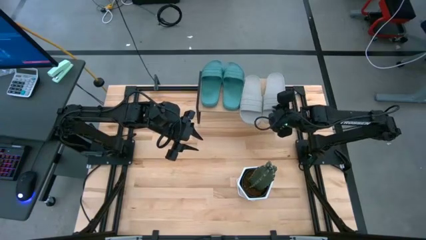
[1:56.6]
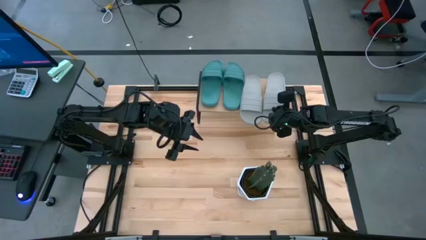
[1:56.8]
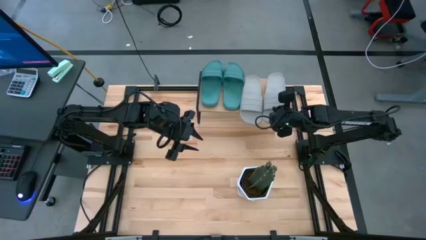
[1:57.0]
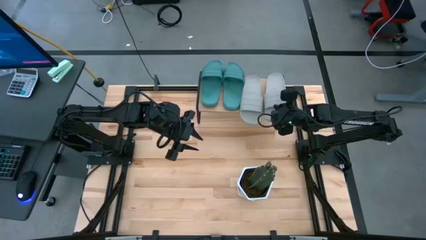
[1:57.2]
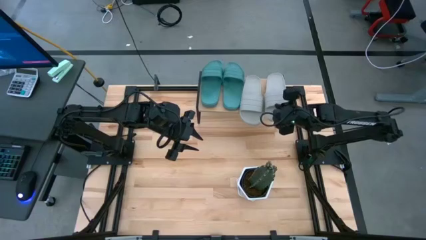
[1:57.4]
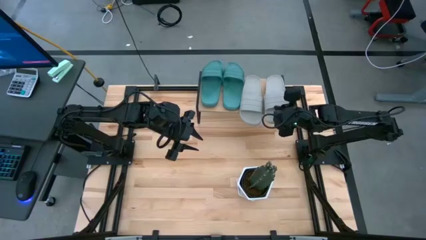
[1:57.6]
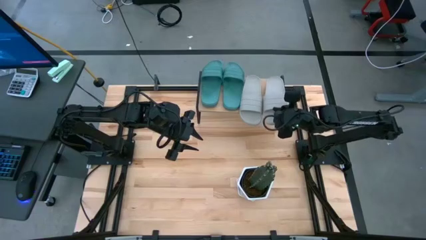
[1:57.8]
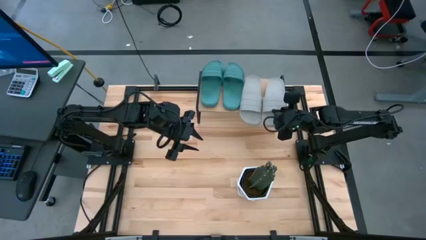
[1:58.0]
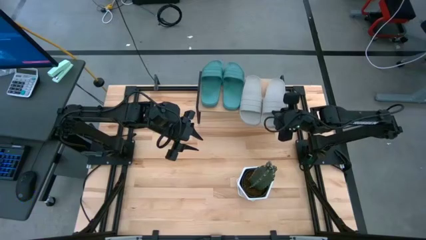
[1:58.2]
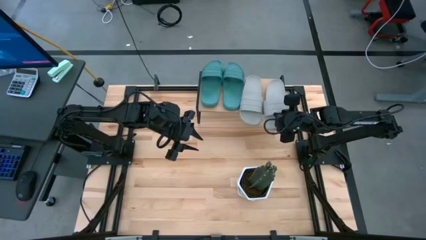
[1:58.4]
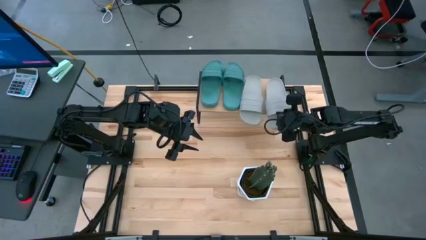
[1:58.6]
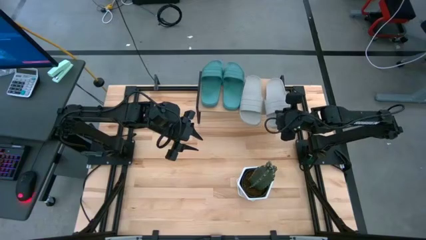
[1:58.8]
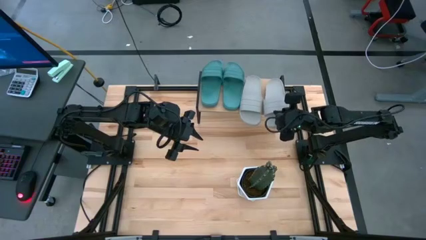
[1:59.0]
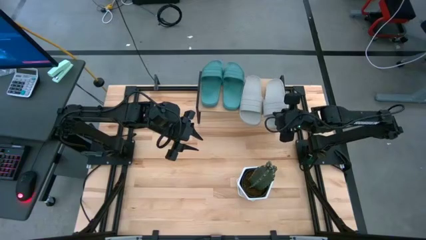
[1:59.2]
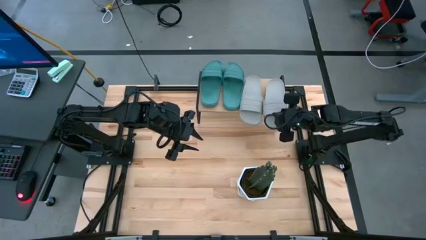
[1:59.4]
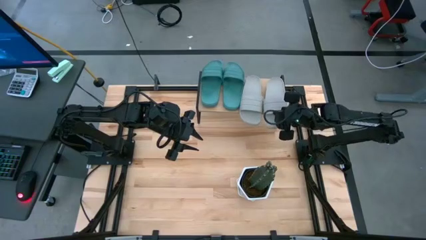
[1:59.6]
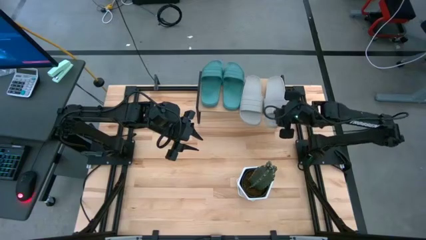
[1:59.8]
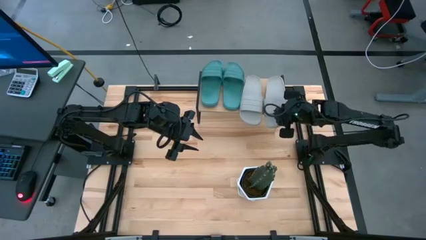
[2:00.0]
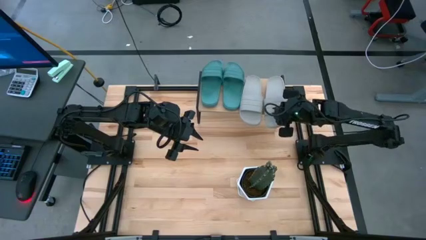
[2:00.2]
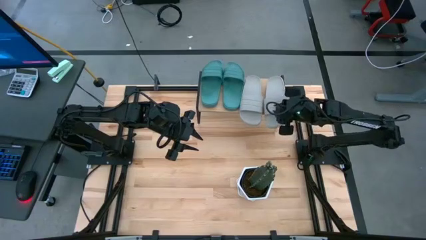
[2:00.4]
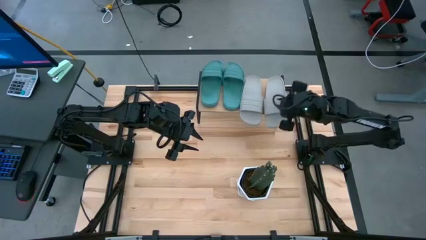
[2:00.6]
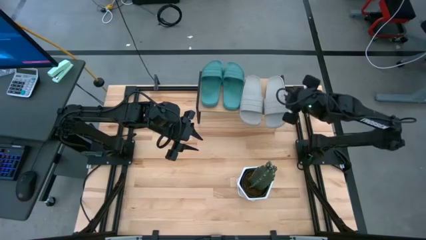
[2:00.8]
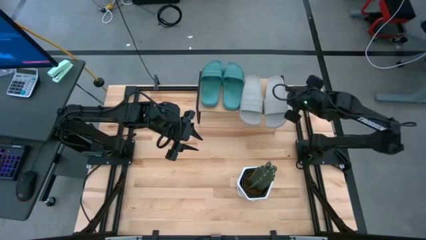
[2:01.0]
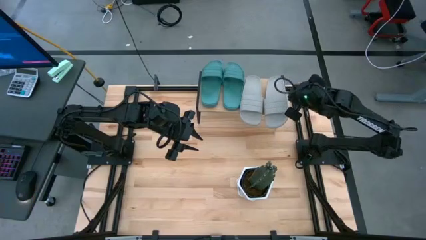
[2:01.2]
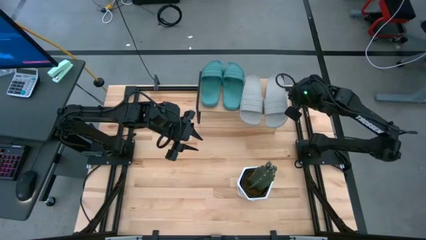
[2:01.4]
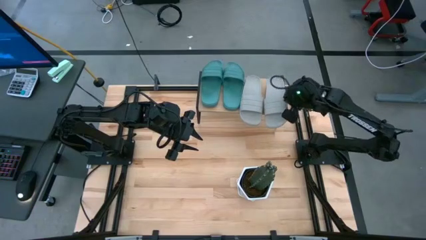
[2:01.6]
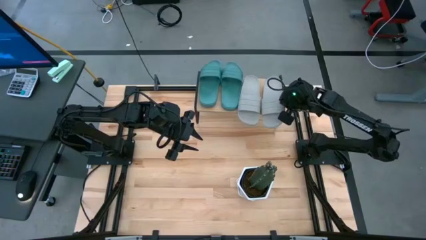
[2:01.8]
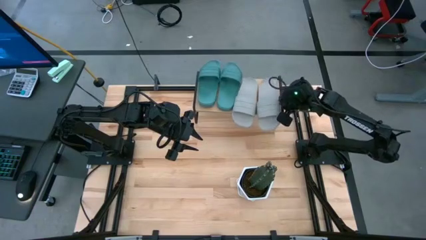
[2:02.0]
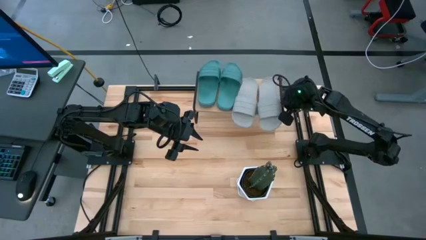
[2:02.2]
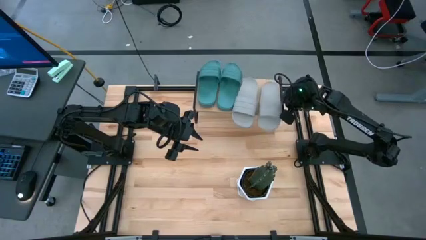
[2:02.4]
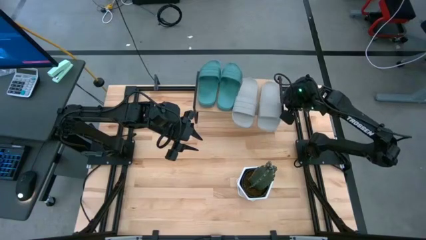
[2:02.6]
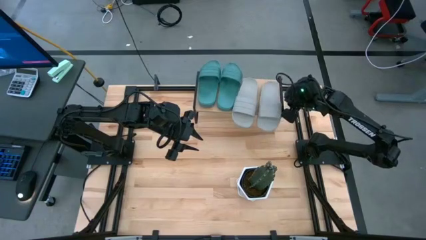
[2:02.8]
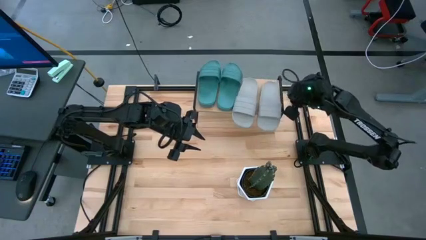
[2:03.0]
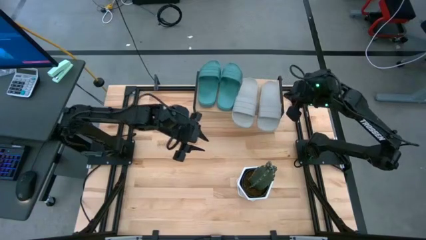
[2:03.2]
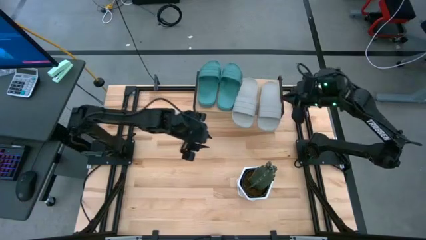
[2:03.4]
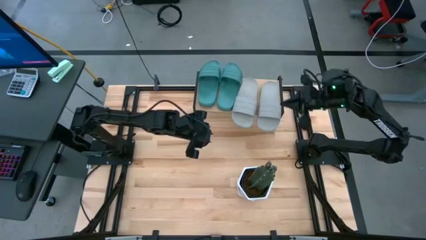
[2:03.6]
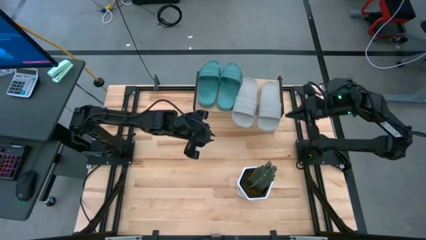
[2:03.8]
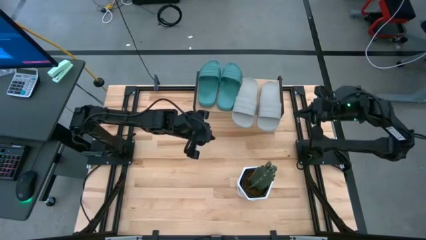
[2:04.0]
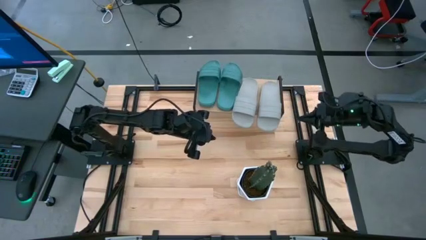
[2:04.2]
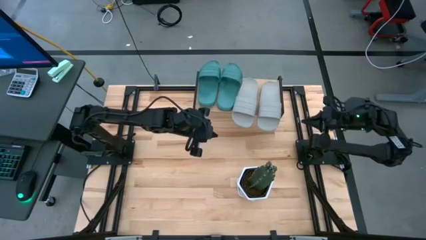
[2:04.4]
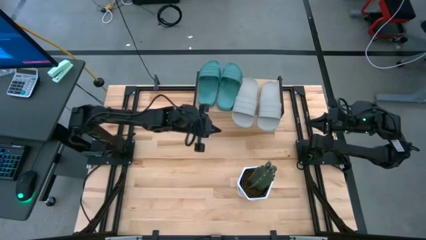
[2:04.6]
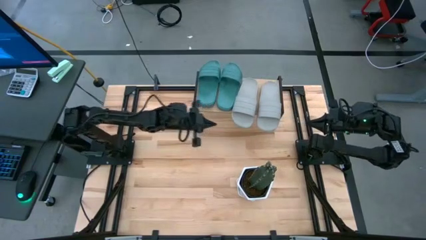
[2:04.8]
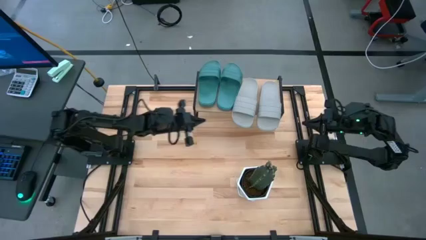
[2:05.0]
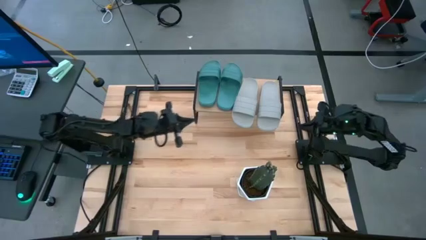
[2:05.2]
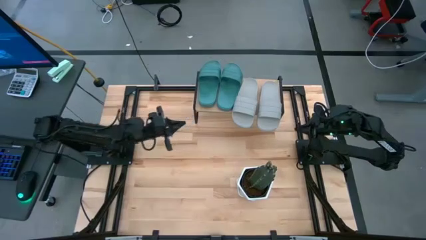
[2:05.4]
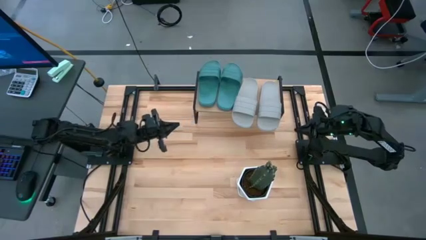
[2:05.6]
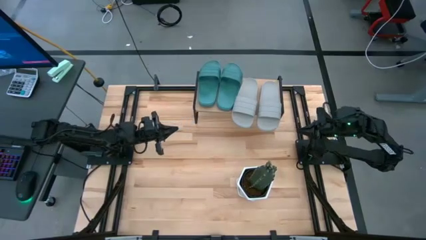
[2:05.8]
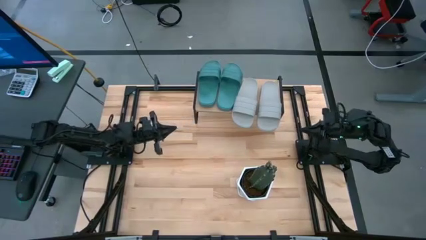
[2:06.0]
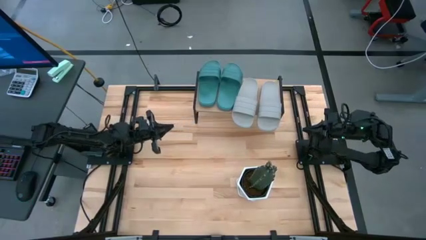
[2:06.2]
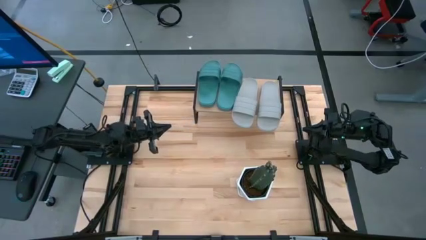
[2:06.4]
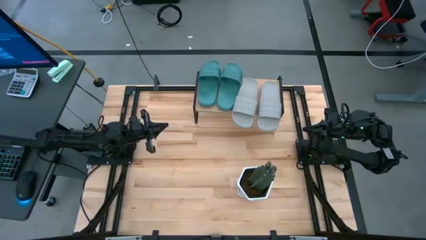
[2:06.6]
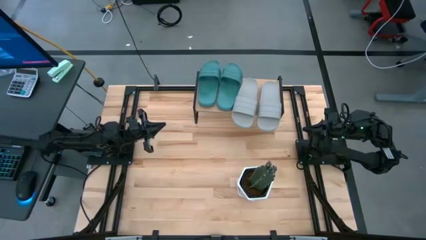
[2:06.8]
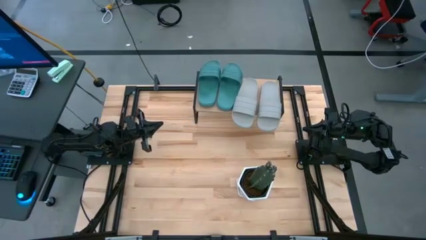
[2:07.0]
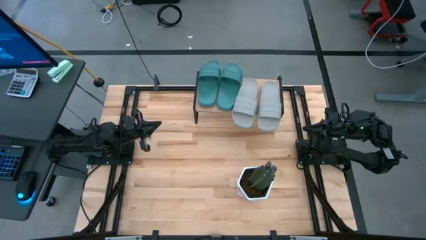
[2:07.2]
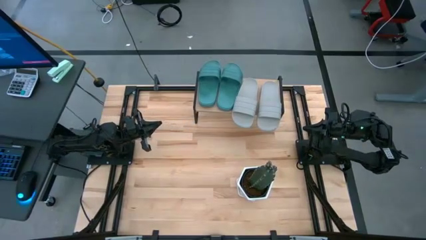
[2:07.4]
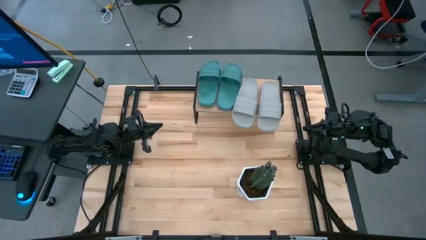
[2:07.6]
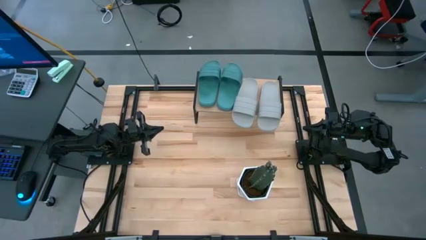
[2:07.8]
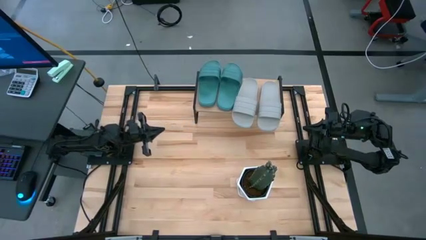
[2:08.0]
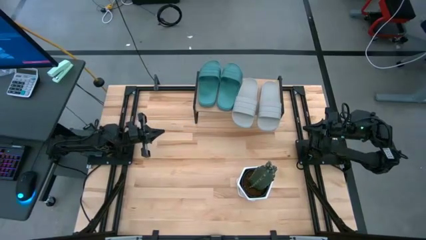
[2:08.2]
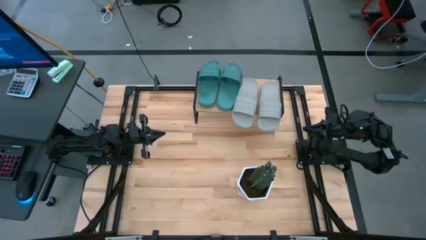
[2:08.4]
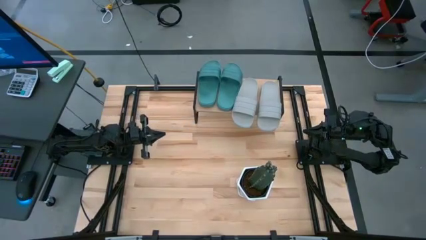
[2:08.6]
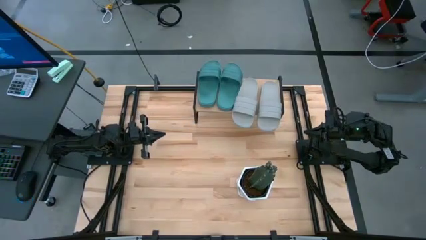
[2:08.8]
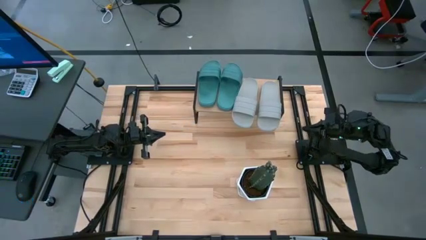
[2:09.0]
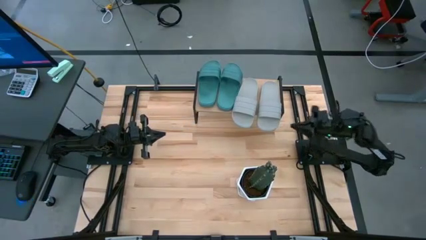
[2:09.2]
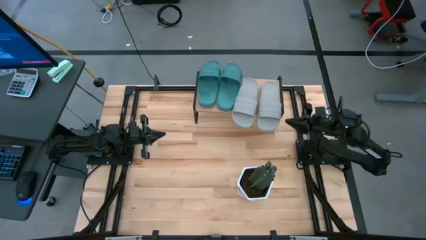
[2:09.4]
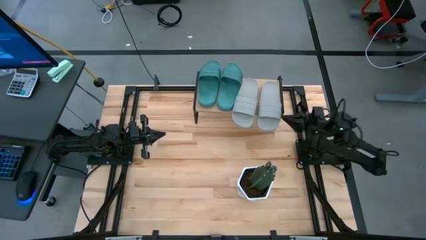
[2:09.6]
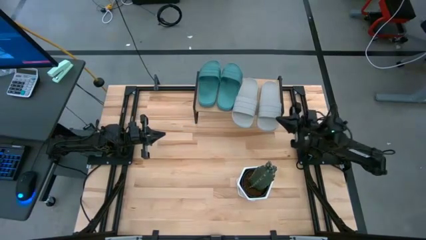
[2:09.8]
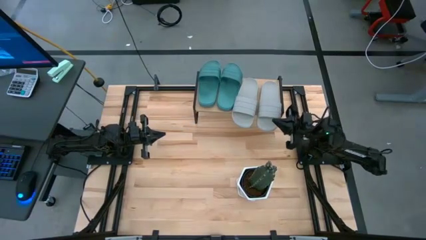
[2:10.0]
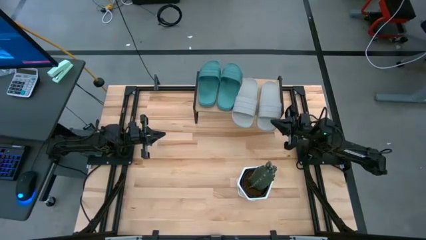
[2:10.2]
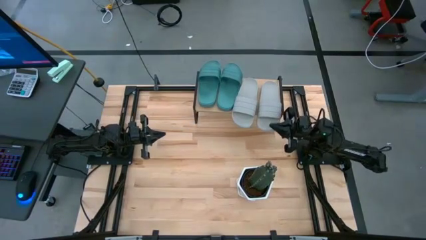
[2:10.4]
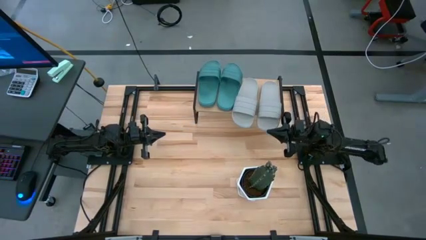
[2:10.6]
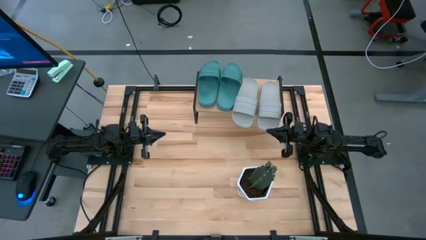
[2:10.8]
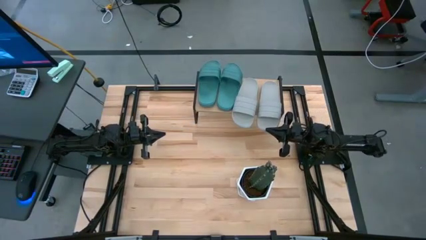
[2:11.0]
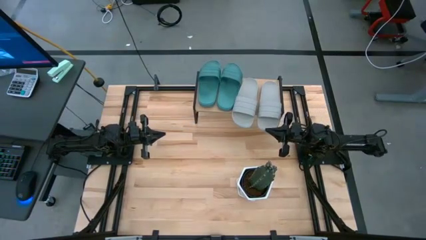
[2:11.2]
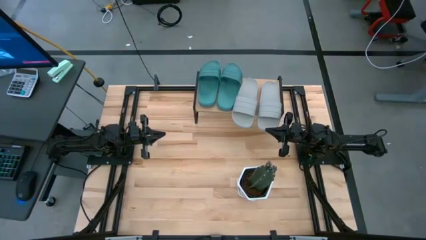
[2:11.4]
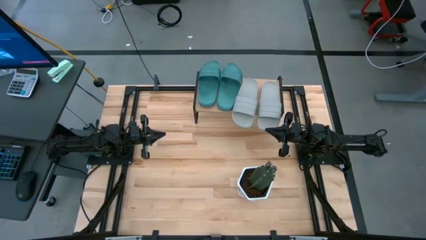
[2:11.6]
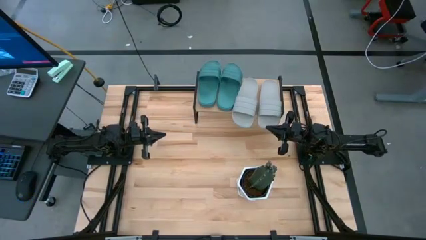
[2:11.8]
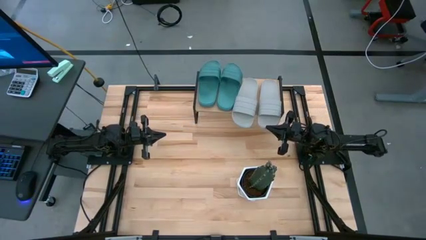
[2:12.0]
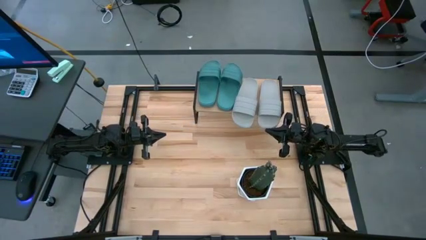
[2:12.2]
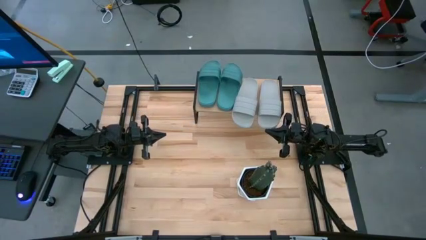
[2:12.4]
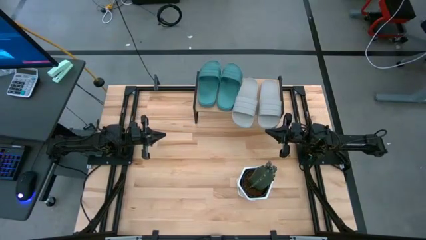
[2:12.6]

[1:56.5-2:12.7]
Task: Pick and place slides into the shelf
Put the gray slides on the shelf
